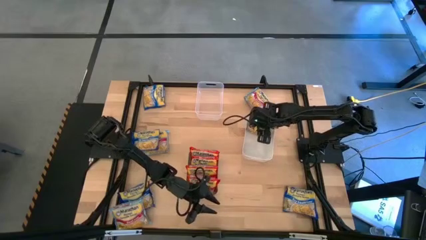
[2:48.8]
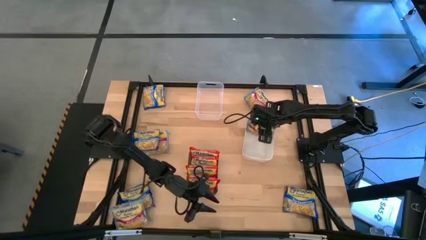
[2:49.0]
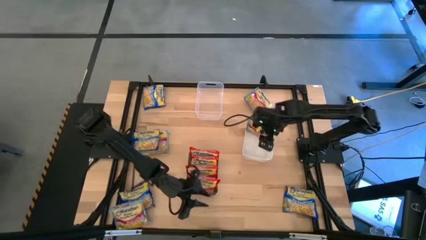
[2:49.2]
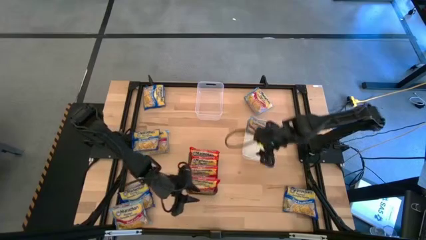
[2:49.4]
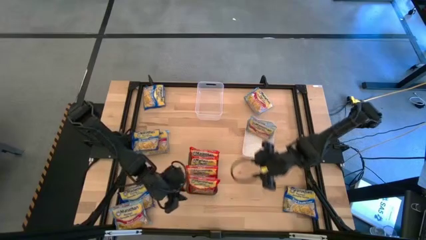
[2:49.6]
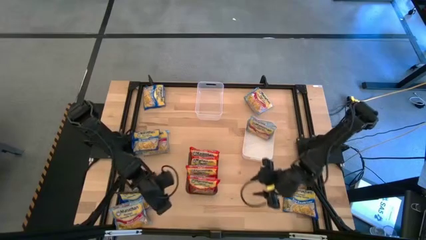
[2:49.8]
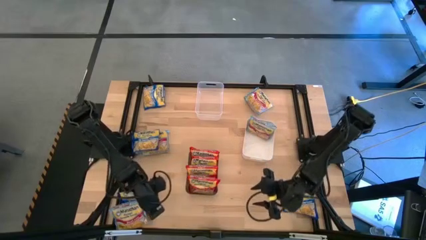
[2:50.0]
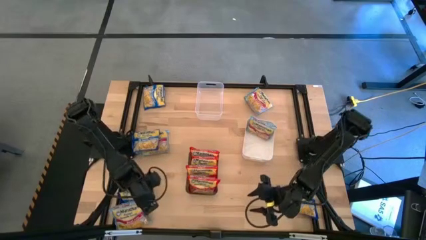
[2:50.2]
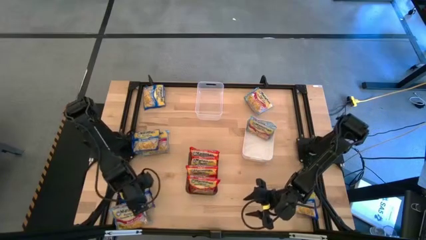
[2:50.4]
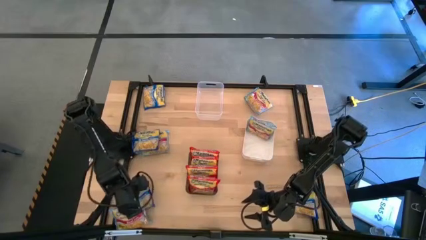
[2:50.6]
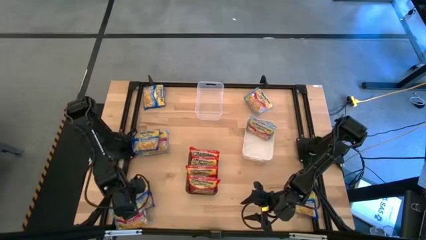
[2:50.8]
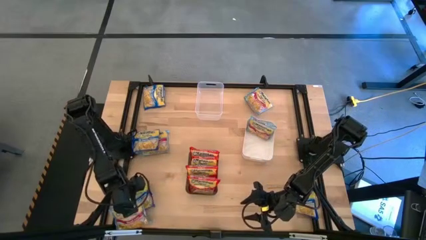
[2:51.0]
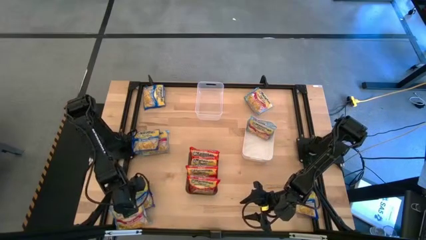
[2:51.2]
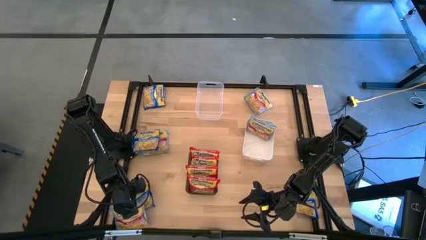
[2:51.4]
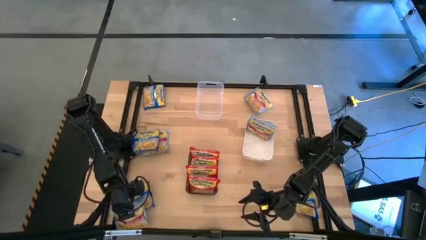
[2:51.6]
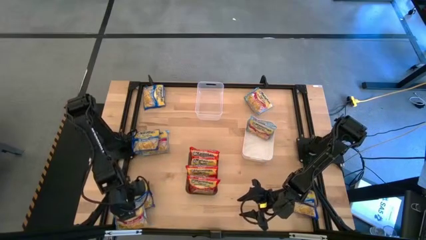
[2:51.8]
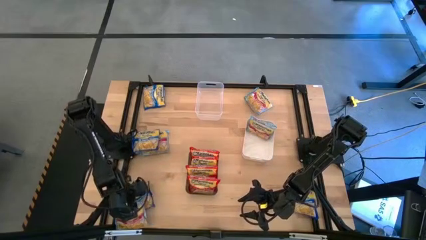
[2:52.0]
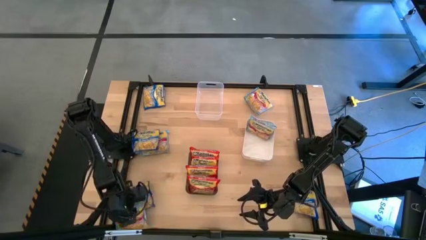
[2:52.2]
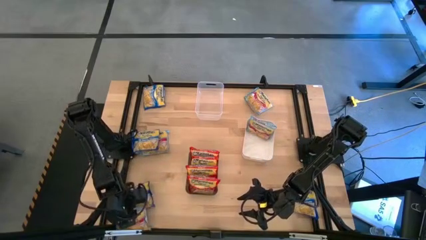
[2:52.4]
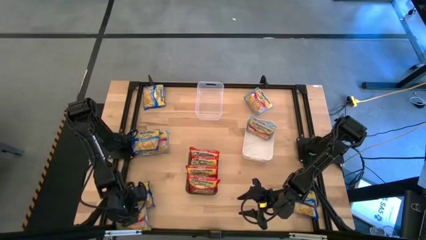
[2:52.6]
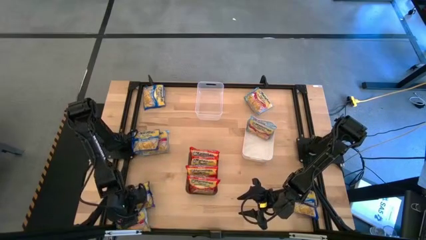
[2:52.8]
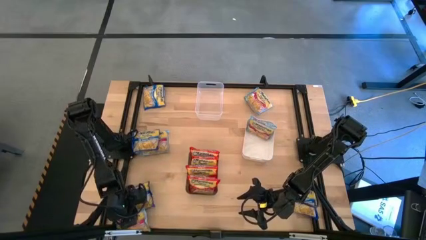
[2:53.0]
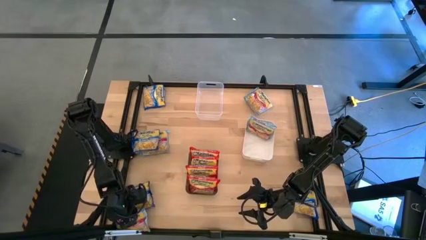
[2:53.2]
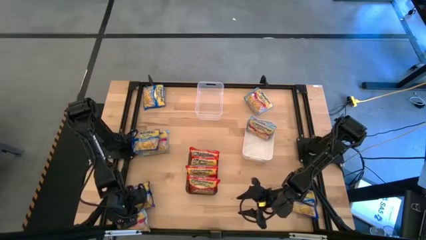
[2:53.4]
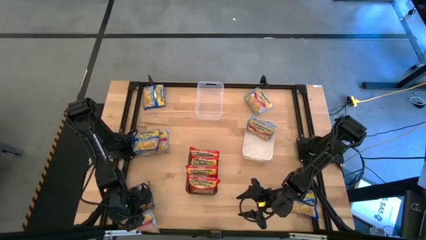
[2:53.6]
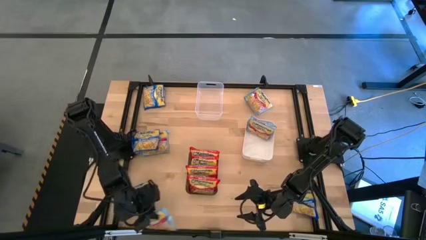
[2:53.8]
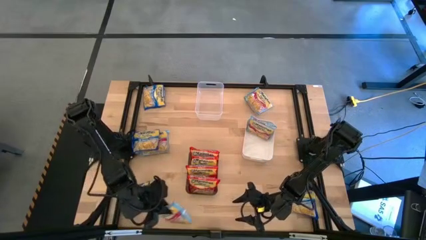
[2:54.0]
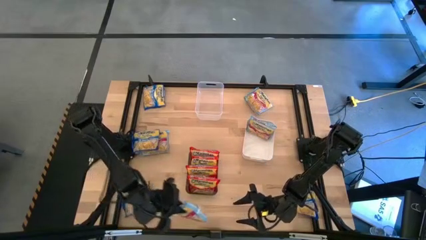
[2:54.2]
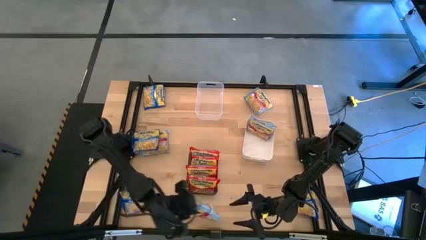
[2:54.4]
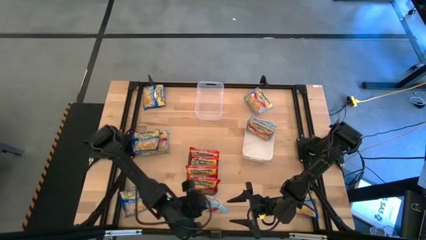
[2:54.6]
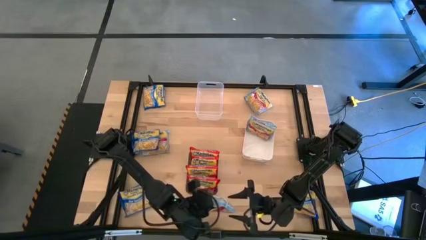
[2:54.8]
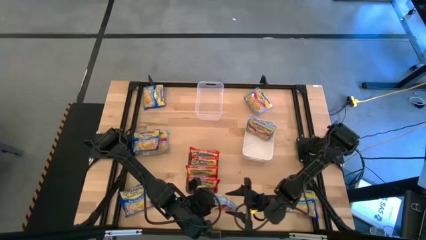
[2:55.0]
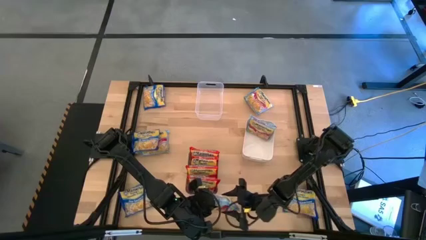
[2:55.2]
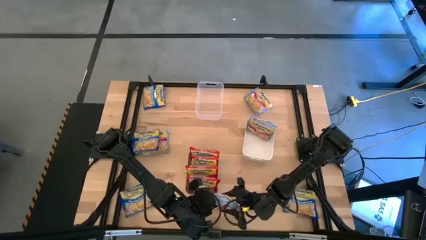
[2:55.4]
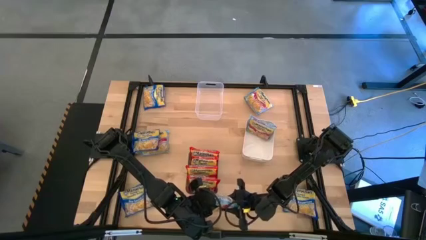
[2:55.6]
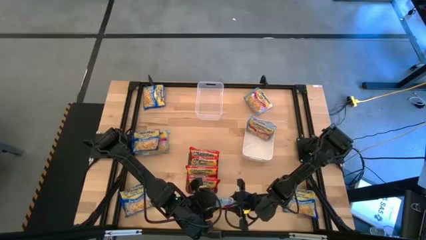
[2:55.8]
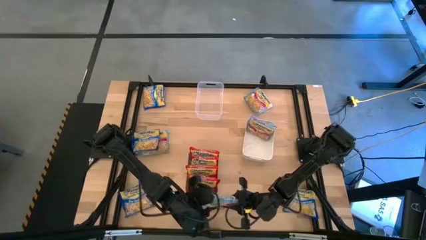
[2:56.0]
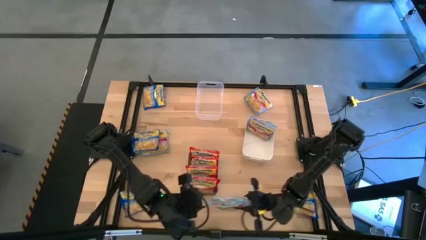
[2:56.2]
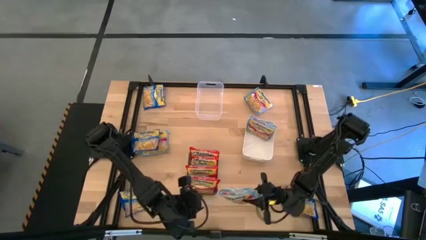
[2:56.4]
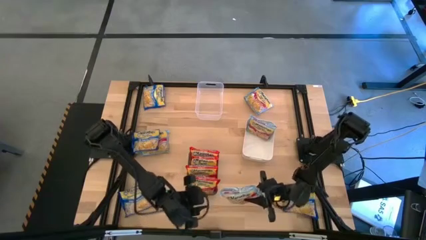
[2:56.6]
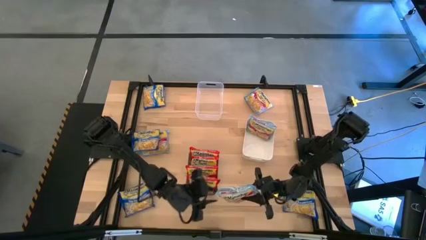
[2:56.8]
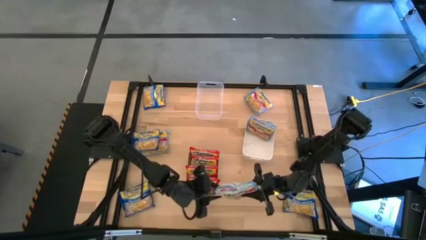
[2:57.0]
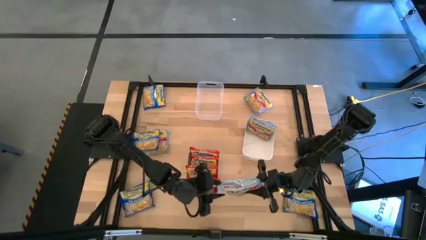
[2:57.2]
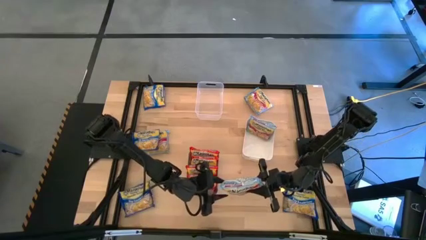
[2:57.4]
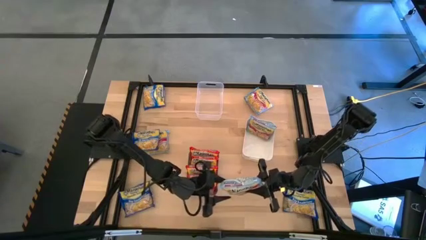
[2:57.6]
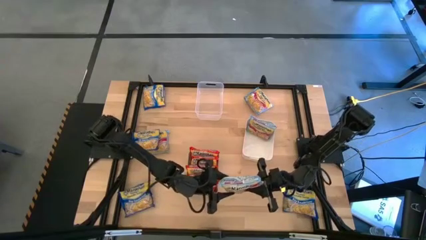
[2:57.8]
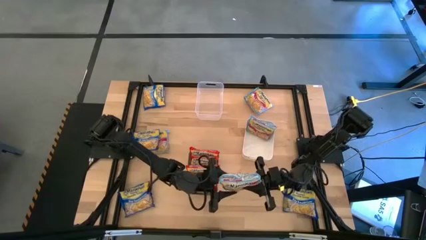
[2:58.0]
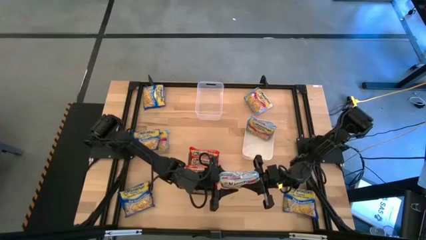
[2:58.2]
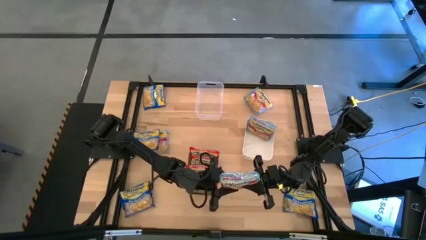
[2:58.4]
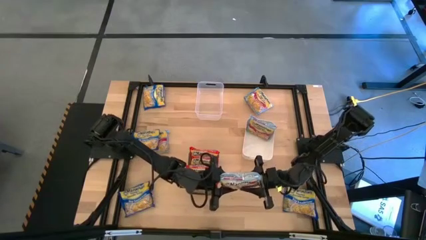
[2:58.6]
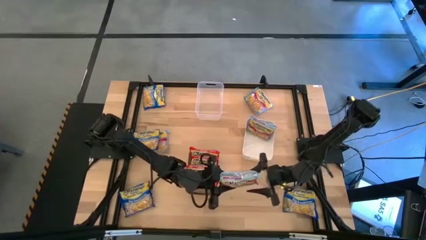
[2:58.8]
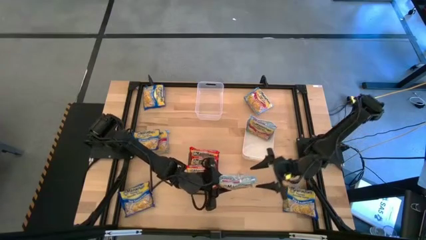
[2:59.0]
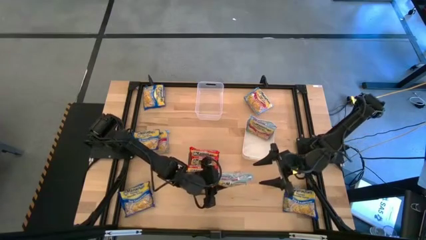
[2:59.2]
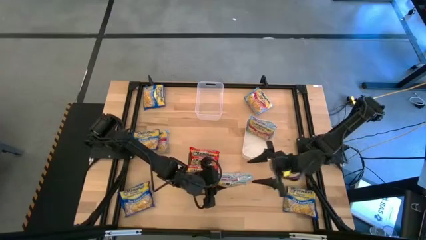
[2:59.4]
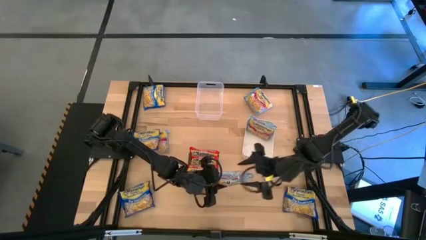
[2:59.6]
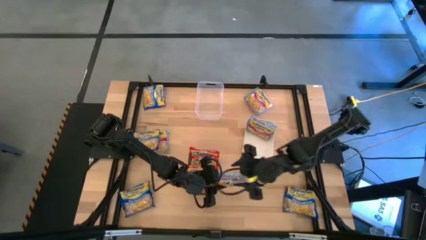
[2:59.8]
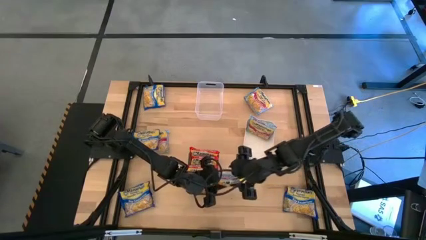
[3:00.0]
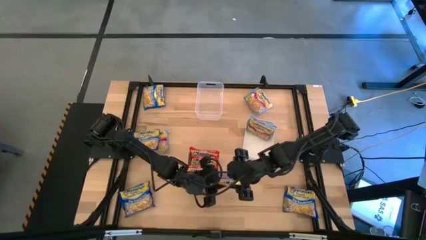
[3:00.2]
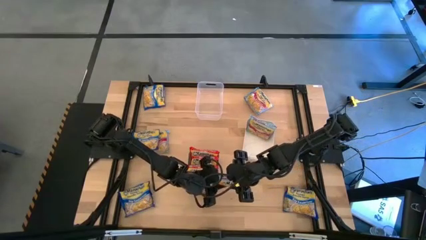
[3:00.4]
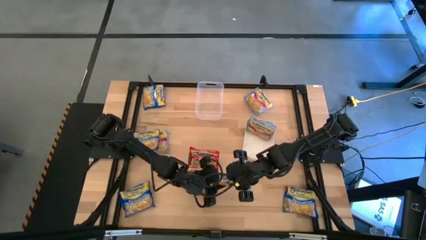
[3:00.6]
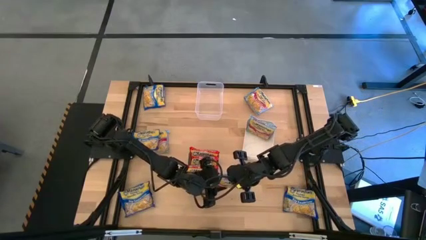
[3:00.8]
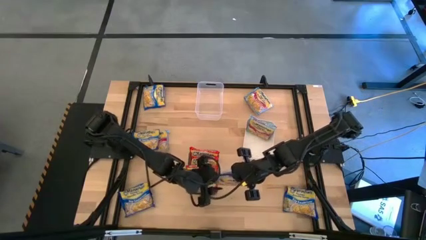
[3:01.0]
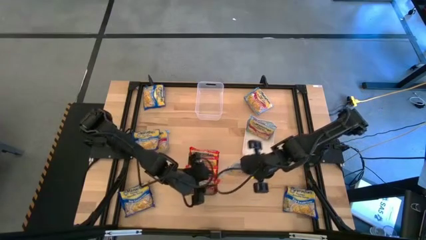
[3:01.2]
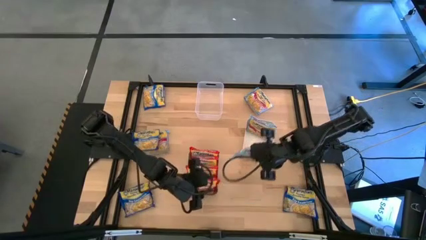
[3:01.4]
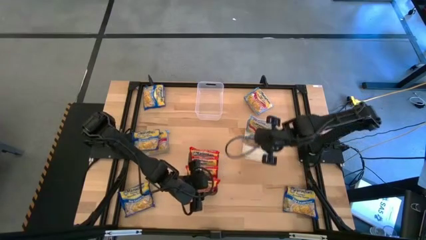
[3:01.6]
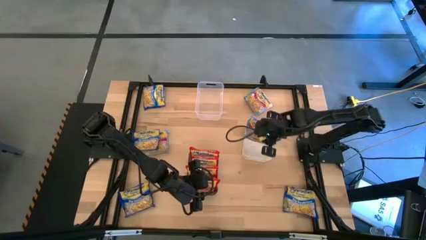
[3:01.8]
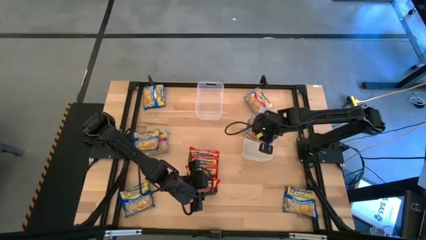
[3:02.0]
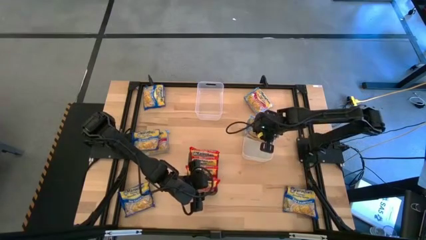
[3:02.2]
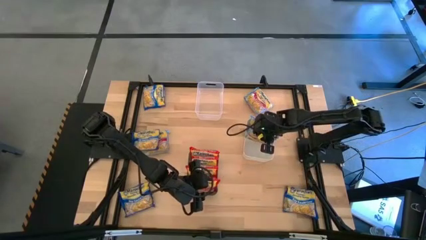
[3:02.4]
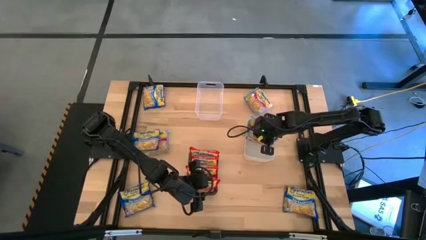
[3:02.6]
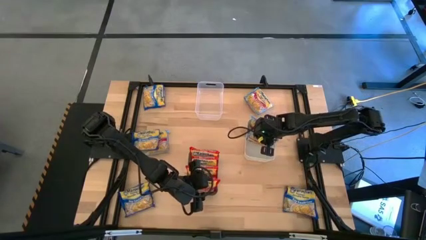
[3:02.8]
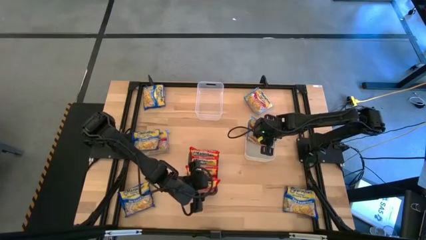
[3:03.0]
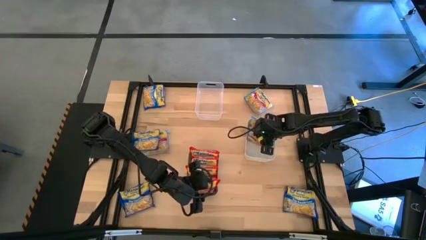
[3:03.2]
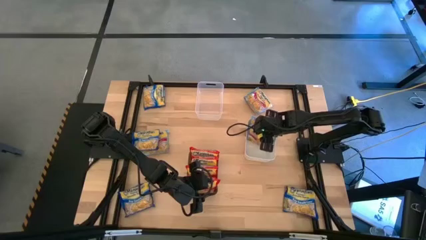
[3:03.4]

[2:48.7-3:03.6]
Task: Sort Maruchan noodles
Put the light blue noodle pack into the white bin

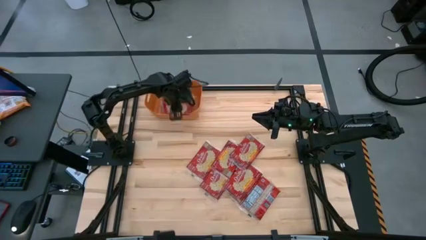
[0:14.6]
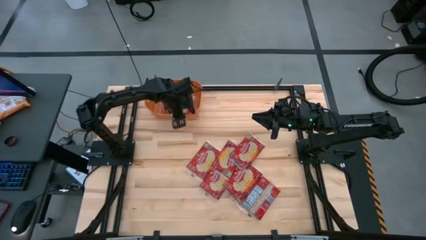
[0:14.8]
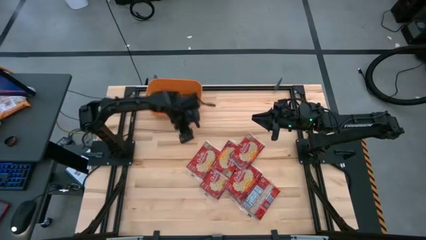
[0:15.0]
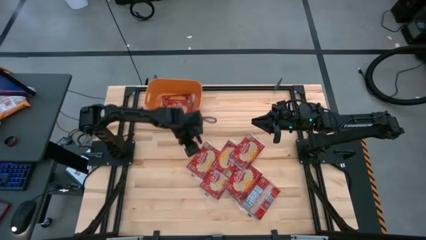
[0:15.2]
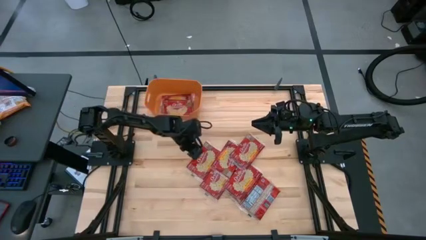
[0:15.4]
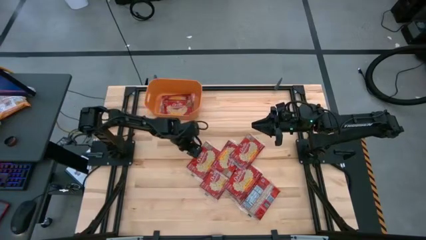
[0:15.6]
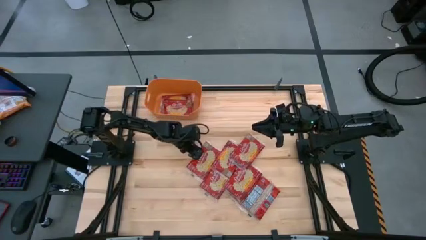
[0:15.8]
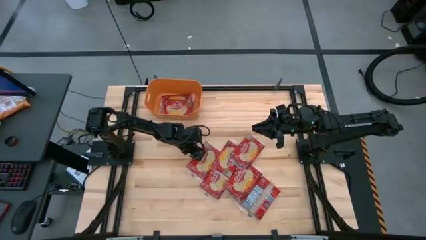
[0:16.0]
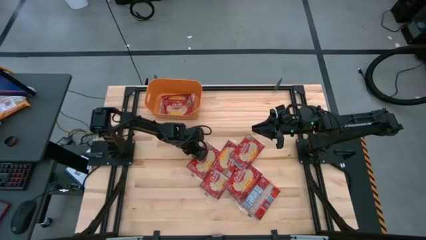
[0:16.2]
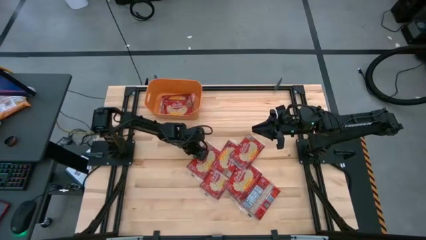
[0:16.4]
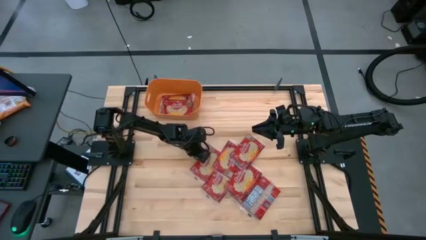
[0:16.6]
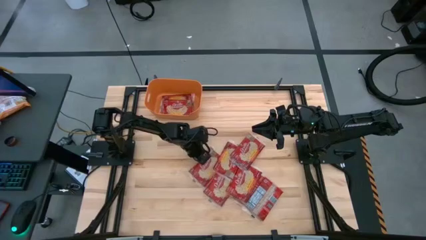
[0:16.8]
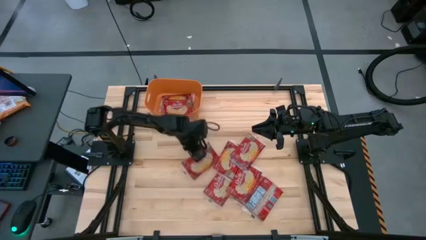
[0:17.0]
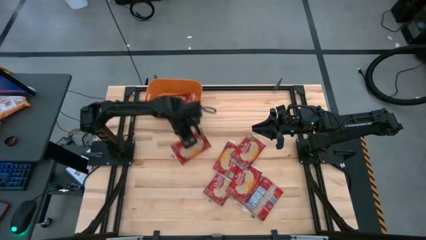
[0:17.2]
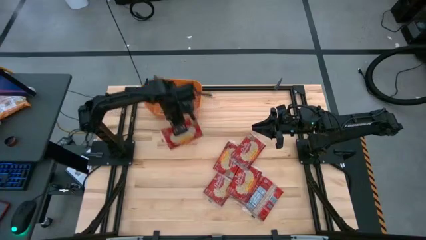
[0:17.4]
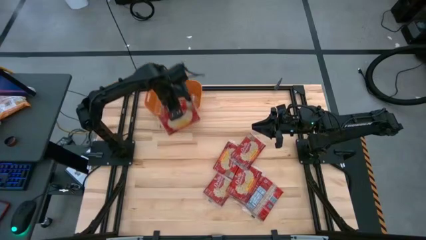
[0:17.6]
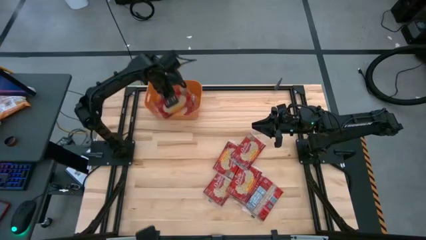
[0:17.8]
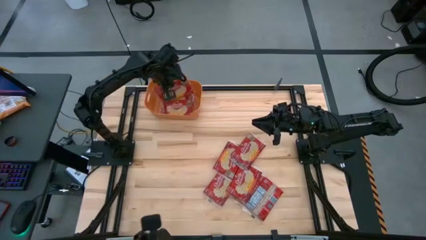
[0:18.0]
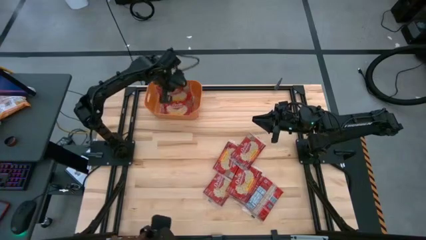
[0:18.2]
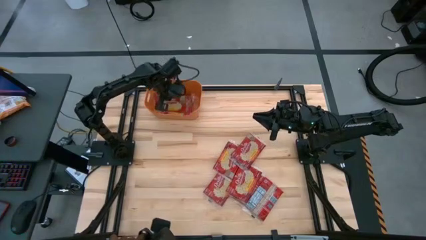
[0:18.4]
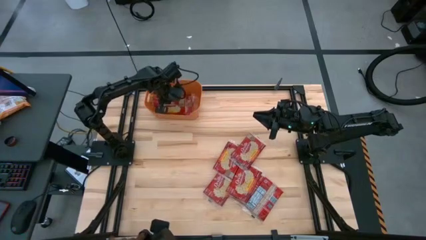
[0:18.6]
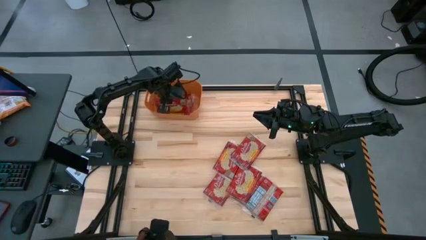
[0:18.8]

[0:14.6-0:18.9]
Task: Sort popcorn bags into baskets
Put the red popcorn bag into the orange bin
